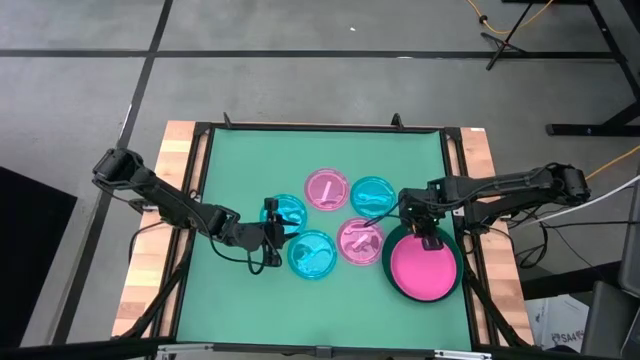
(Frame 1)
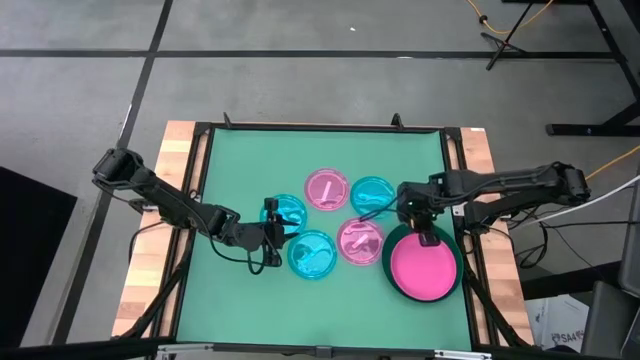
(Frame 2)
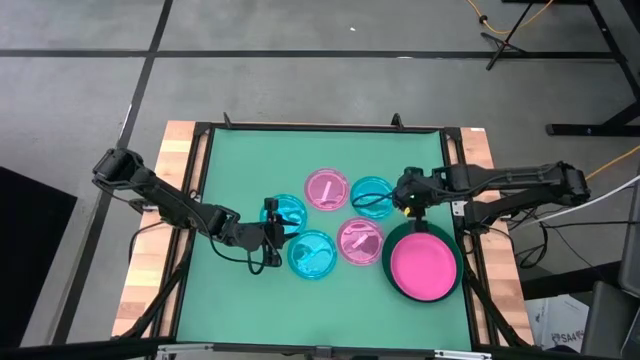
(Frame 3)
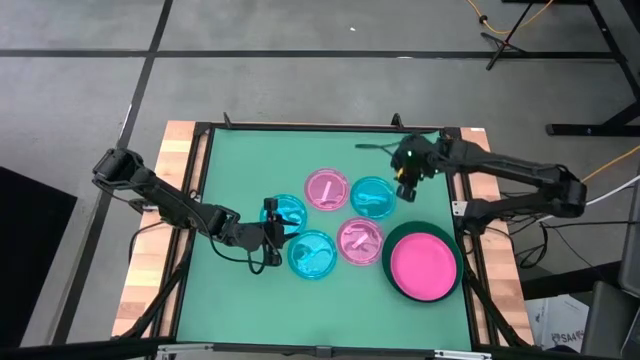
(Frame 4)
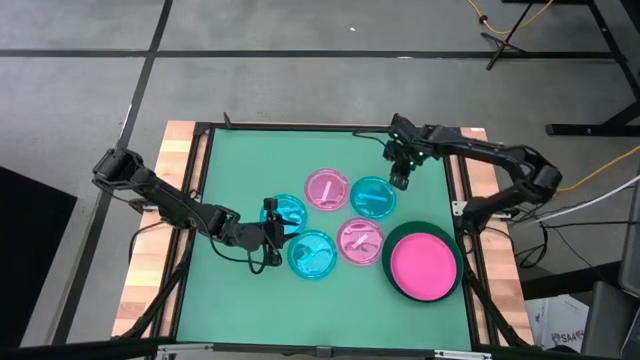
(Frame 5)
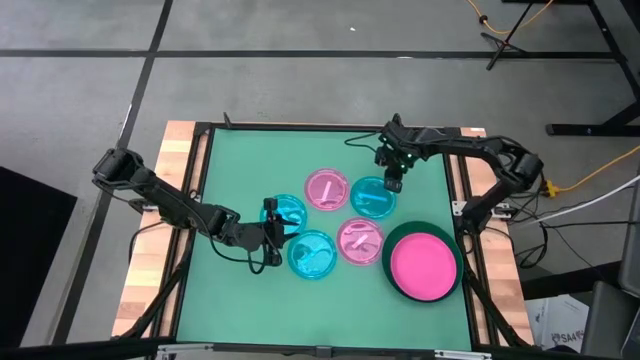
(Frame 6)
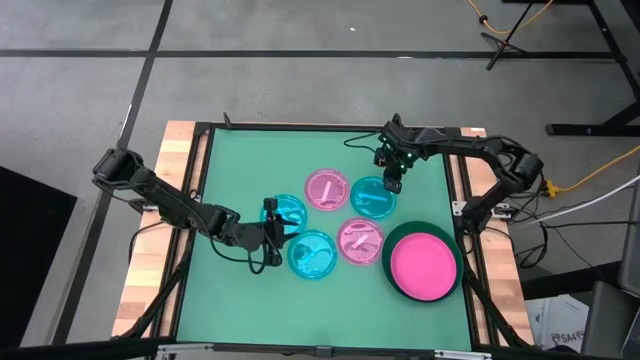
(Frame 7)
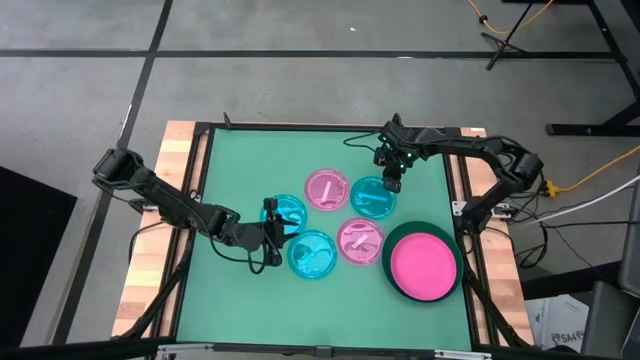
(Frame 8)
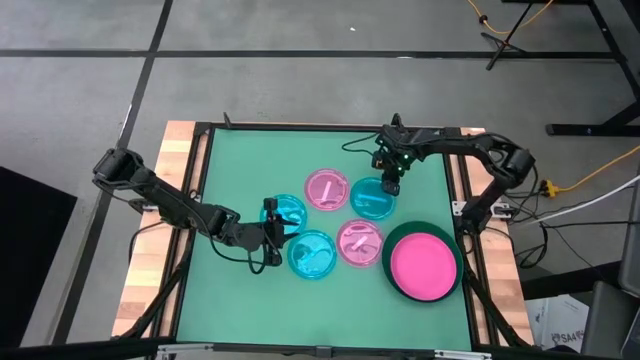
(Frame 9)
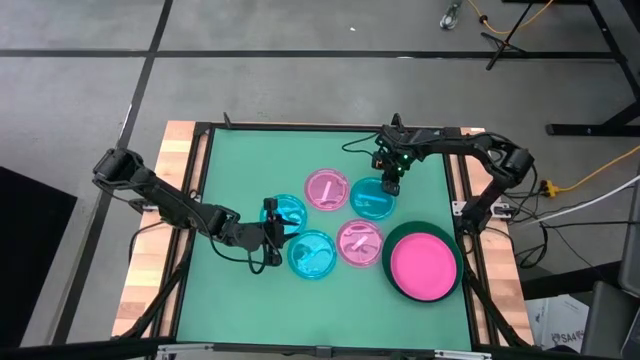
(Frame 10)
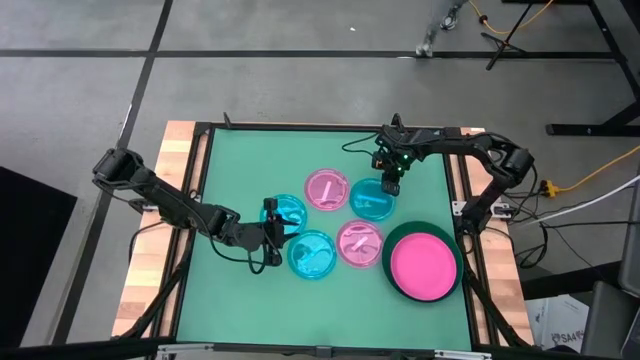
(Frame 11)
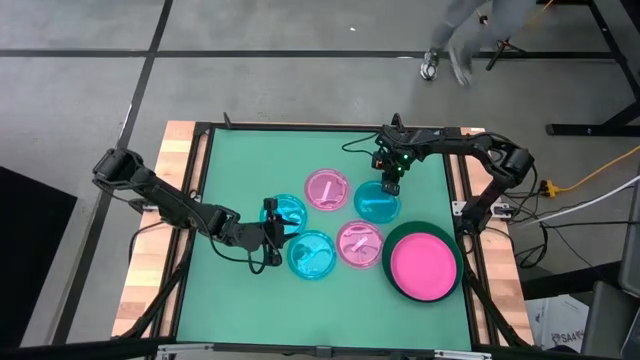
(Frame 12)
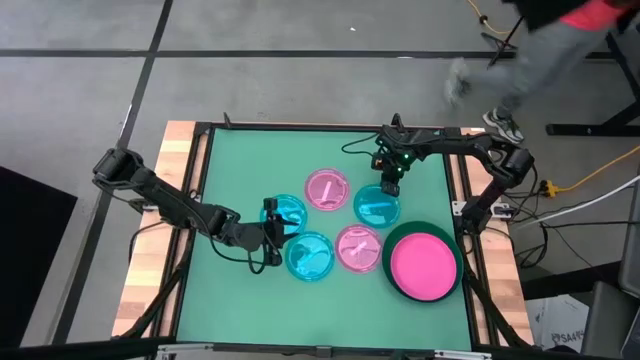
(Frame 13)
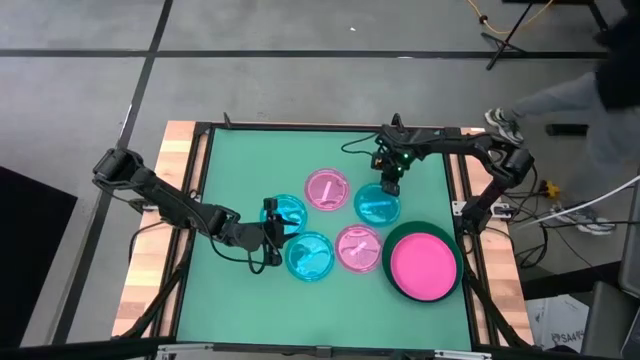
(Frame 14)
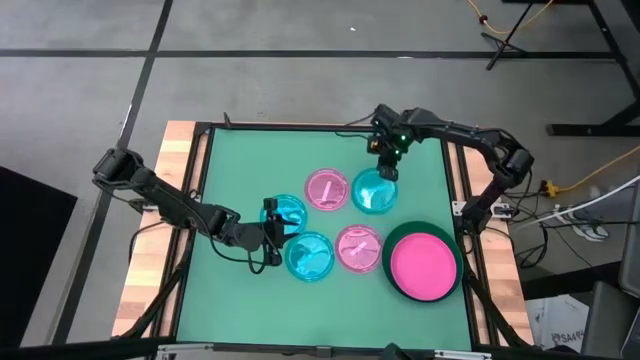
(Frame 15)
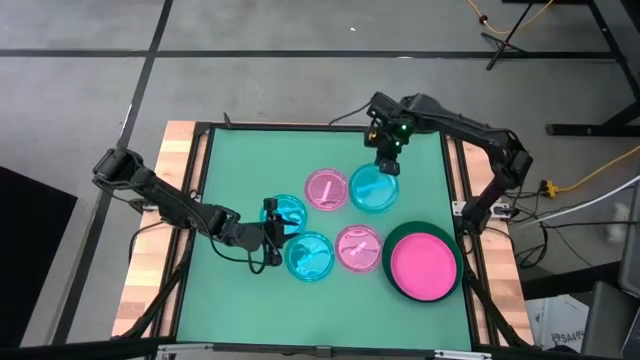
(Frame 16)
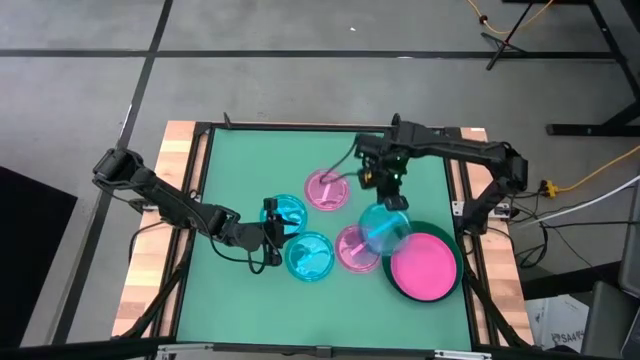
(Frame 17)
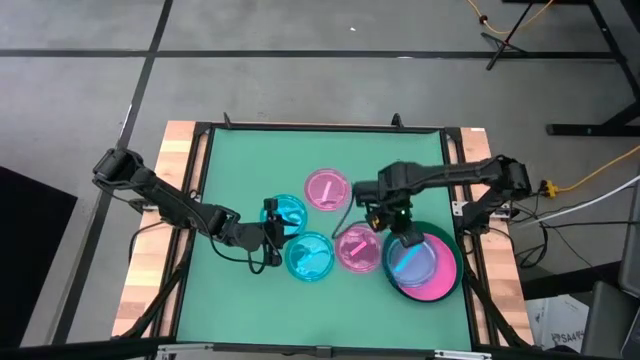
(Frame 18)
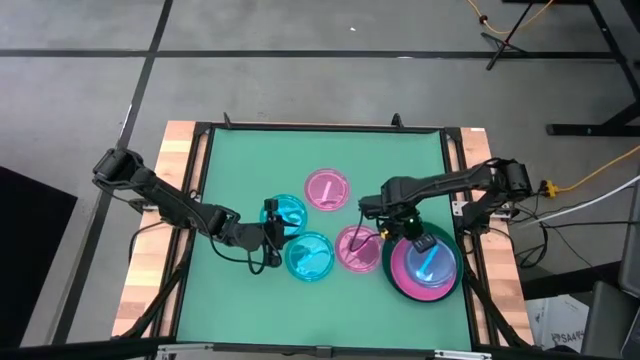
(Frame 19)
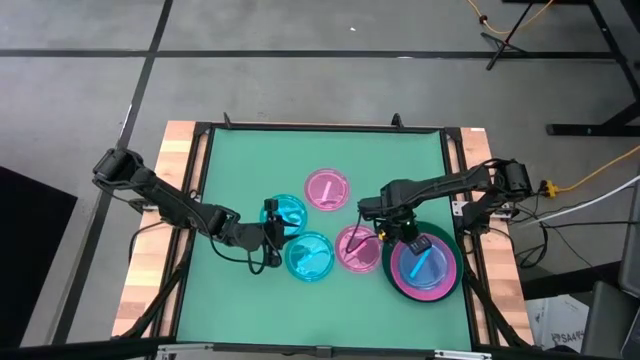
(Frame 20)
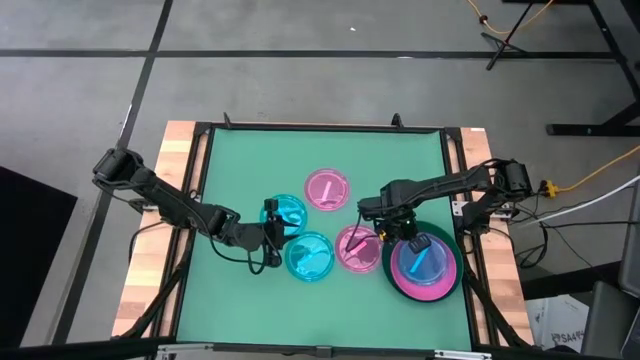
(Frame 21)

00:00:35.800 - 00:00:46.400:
Task: Stack plastic plates
Stack the top right transparent blue plate on top of the pink plate

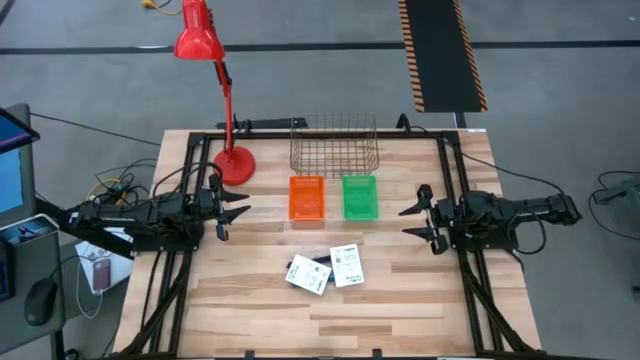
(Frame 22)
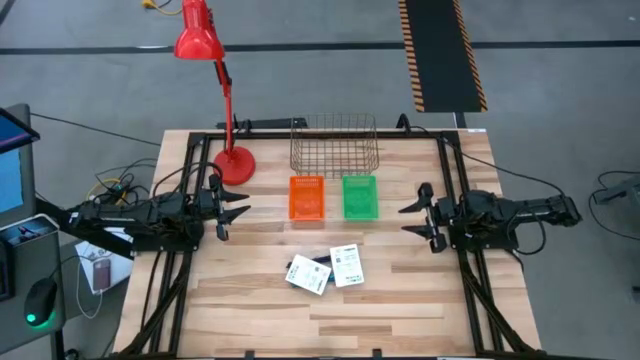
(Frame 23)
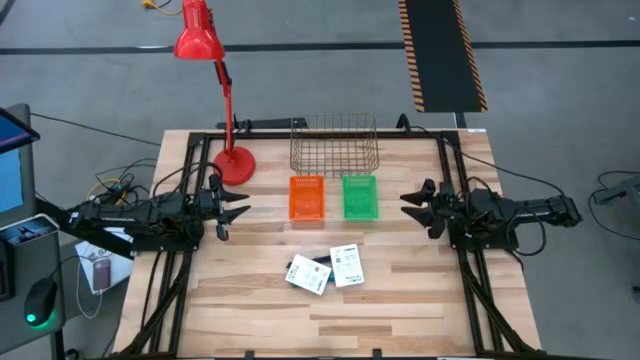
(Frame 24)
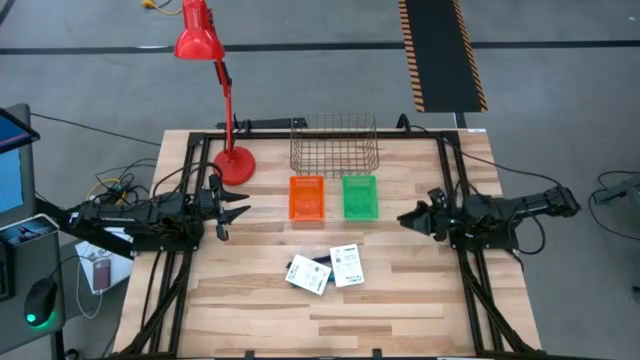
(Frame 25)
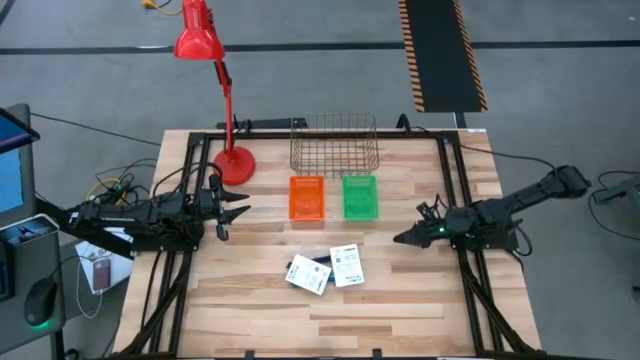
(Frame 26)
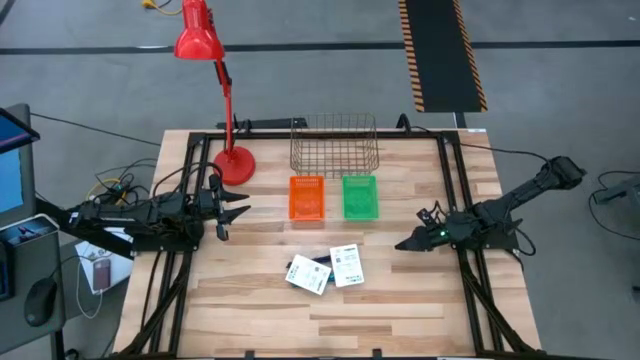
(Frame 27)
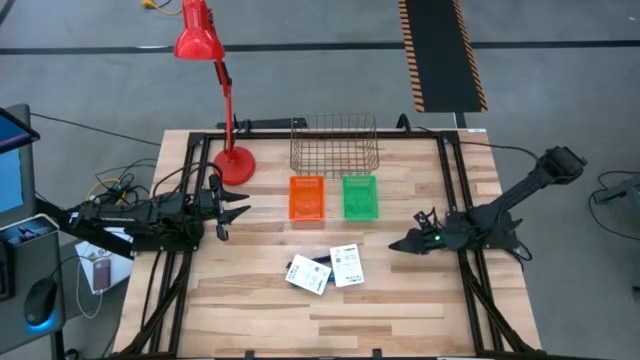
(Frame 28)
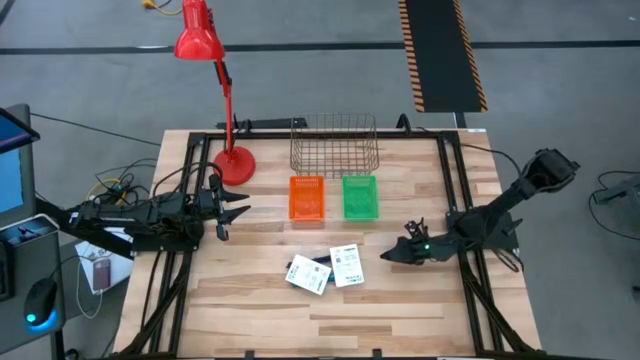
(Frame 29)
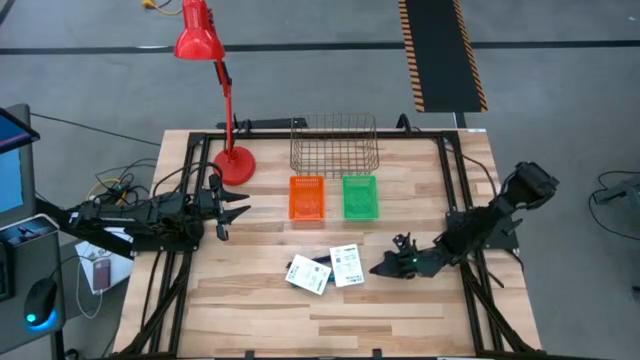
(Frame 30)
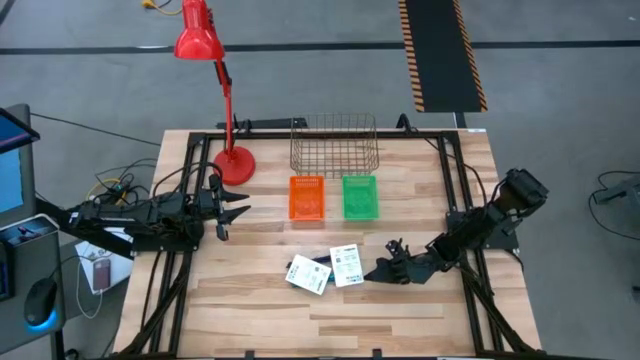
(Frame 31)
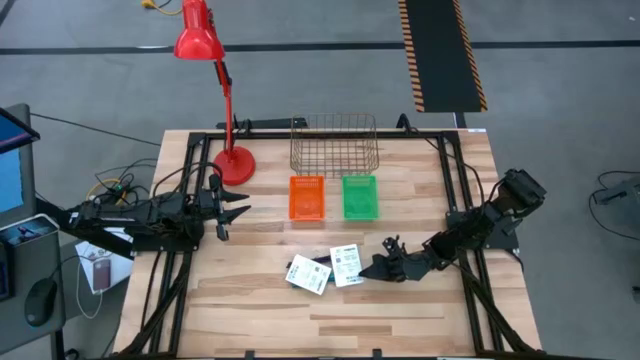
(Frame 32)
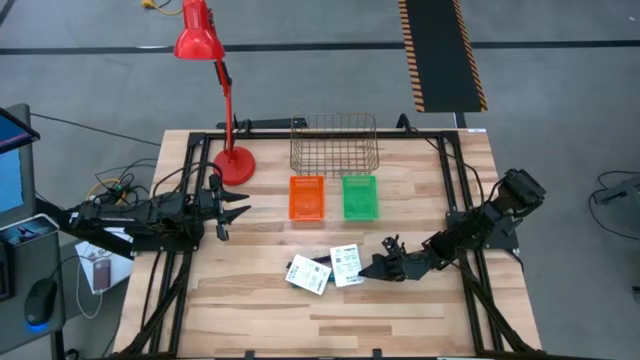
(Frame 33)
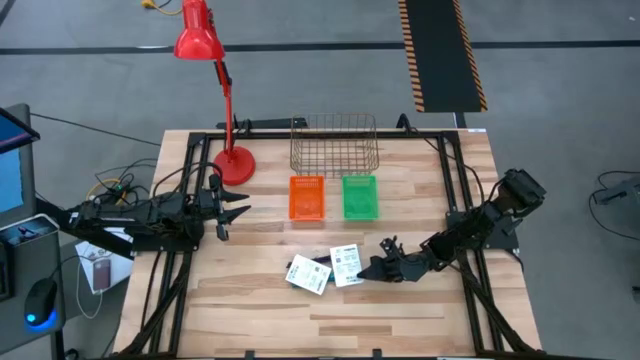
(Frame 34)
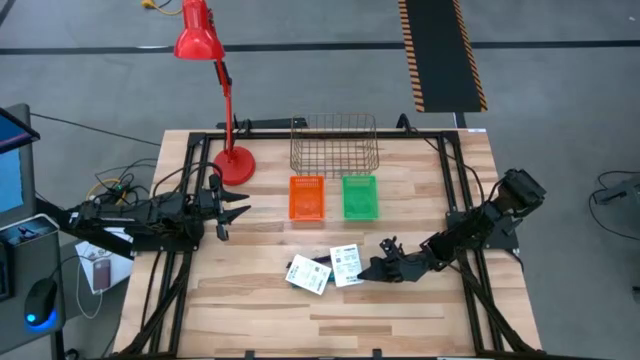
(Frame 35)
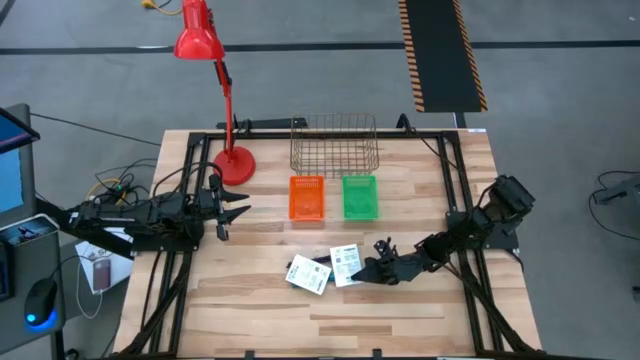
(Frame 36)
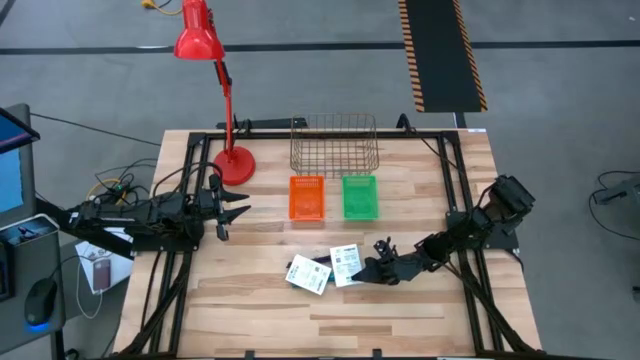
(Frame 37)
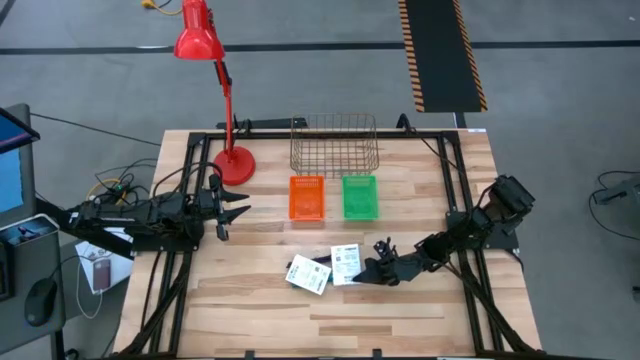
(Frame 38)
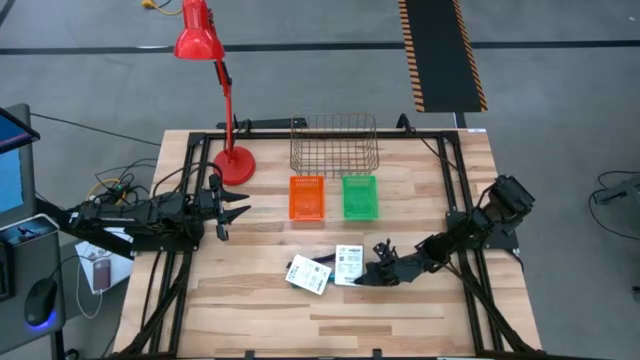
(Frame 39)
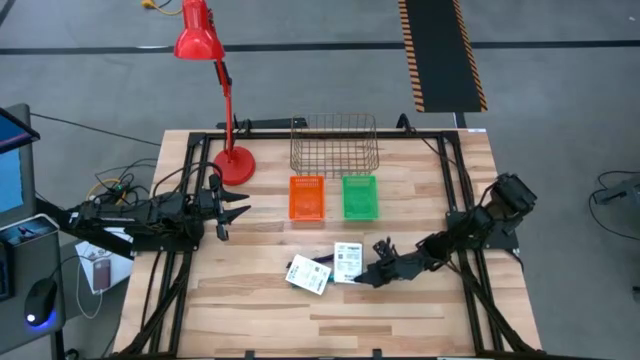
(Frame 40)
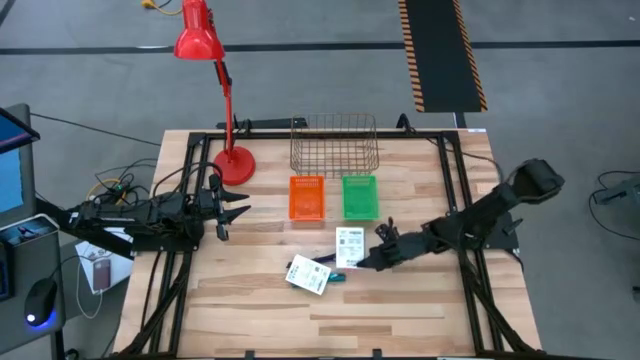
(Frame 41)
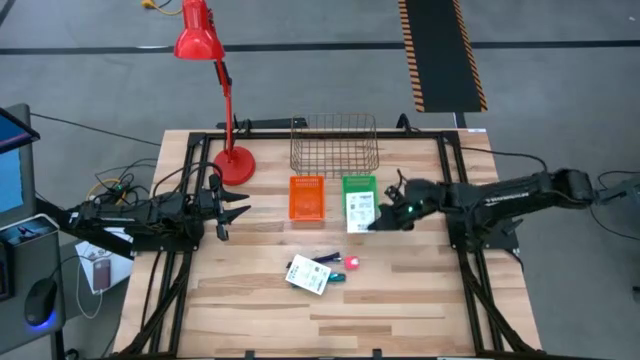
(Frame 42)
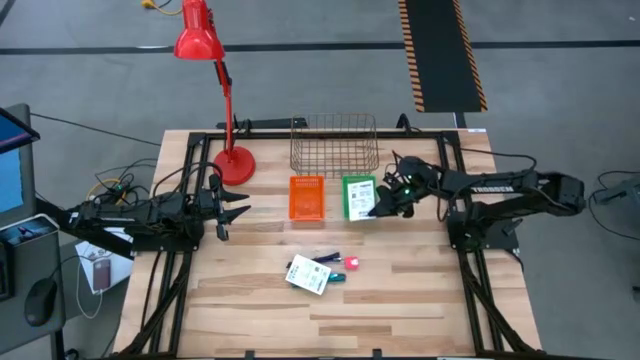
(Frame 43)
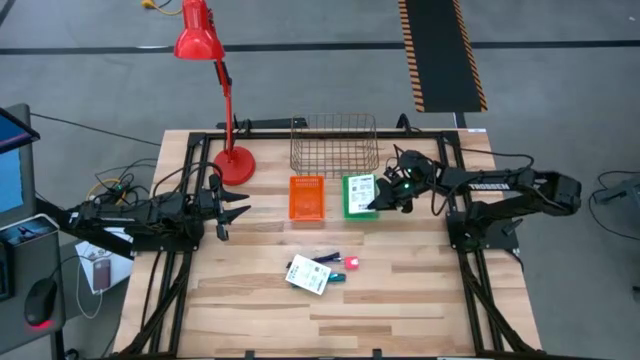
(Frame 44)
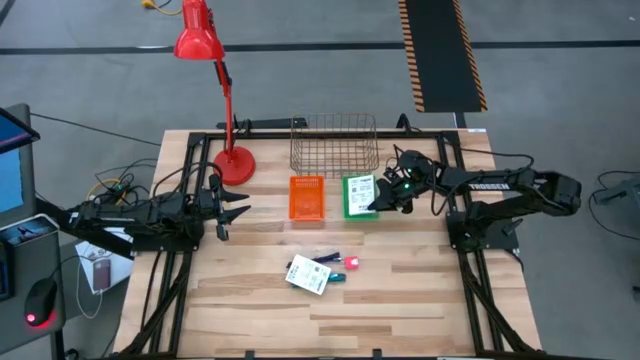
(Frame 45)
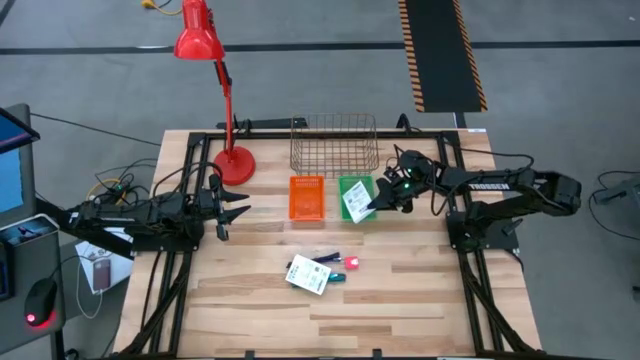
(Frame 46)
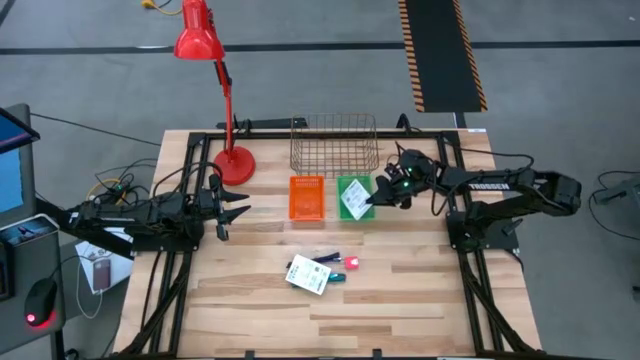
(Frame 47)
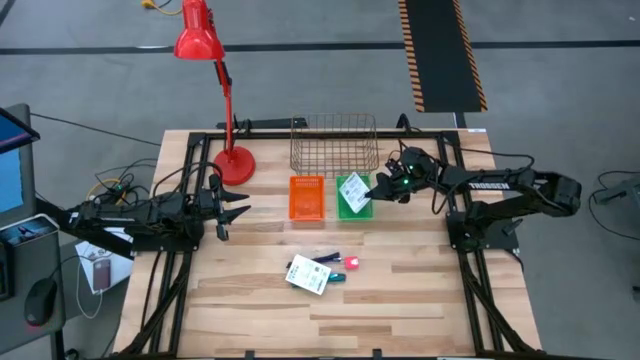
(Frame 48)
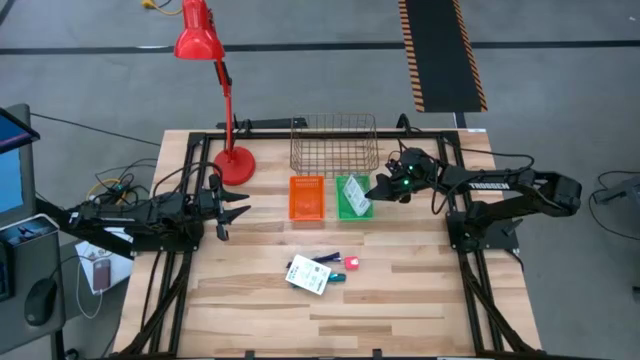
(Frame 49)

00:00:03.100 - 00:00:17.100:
Task: Pick and place items into bin
Put the white card reader box into the green bin
